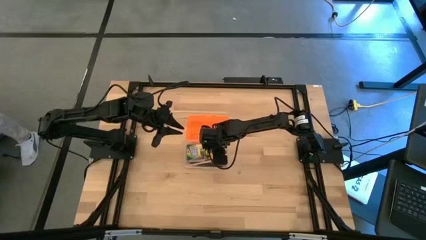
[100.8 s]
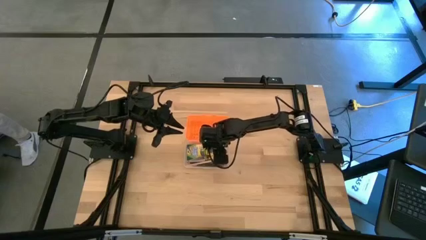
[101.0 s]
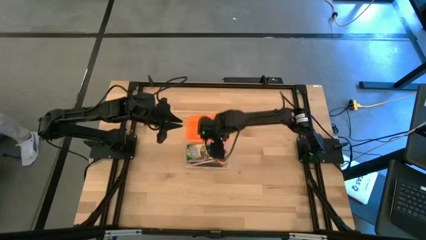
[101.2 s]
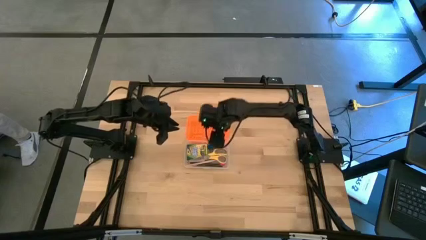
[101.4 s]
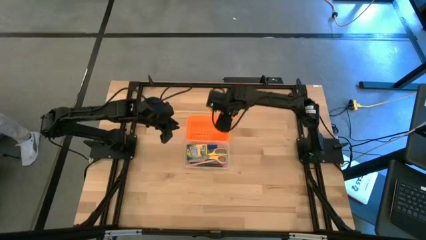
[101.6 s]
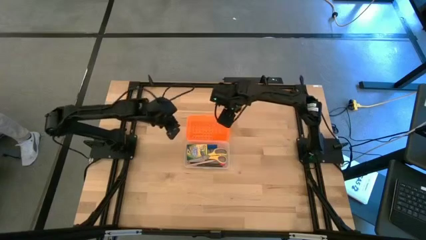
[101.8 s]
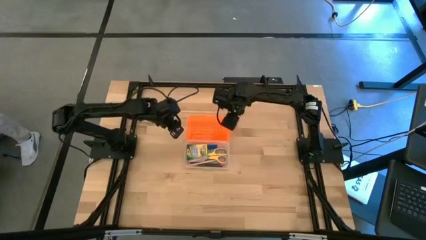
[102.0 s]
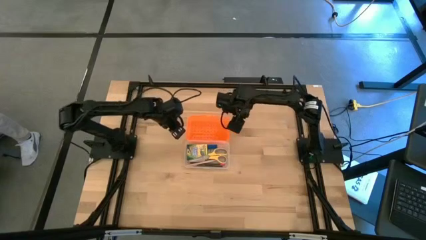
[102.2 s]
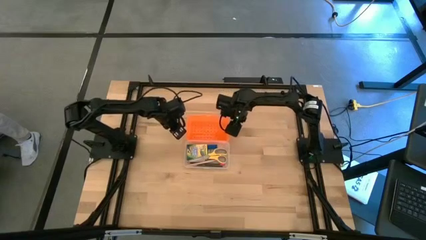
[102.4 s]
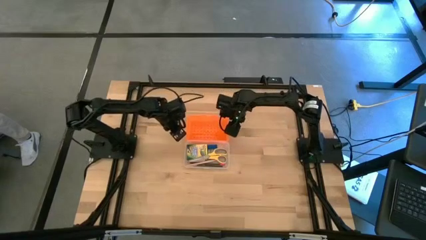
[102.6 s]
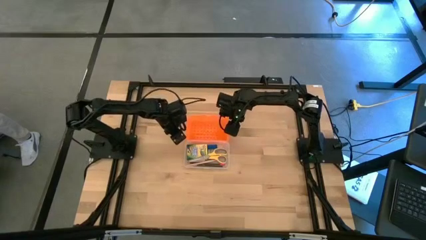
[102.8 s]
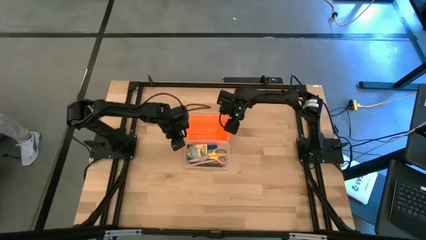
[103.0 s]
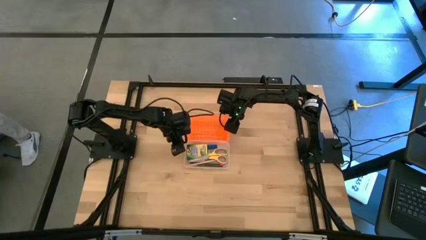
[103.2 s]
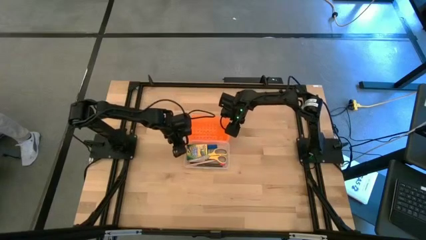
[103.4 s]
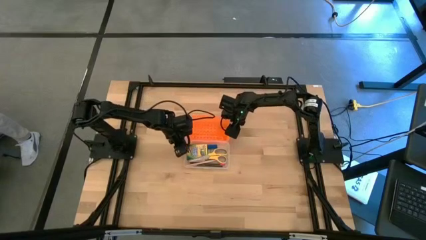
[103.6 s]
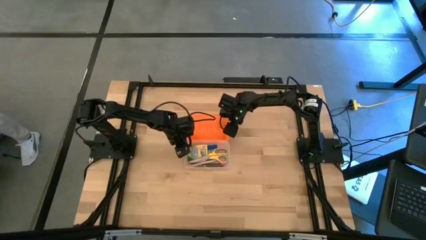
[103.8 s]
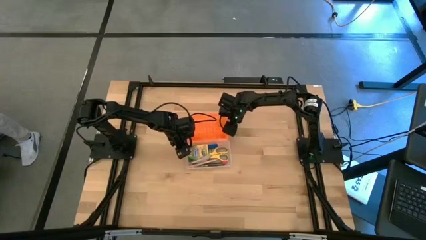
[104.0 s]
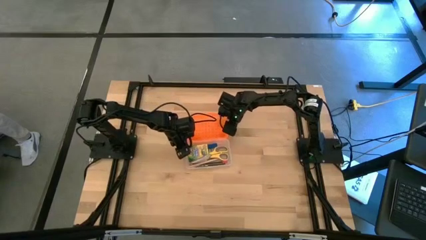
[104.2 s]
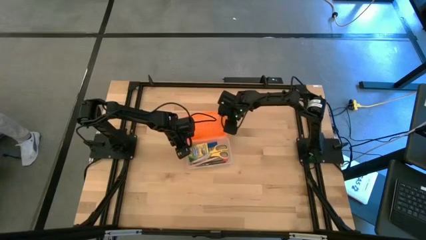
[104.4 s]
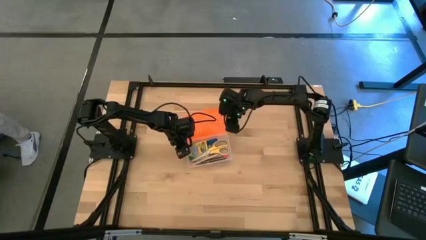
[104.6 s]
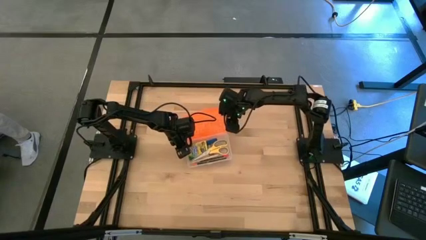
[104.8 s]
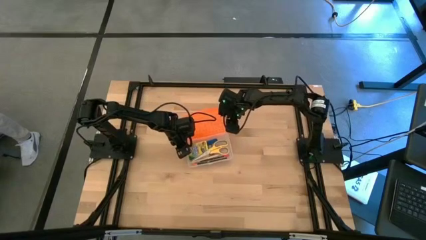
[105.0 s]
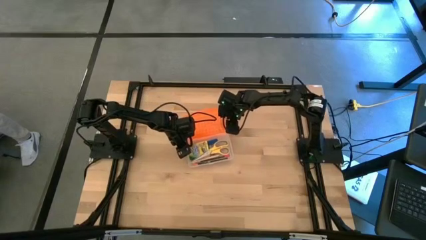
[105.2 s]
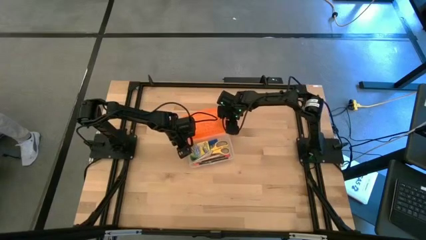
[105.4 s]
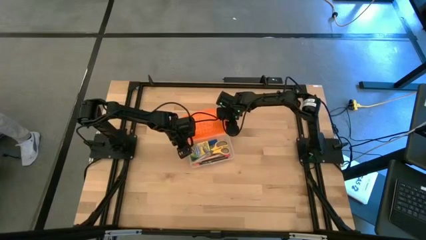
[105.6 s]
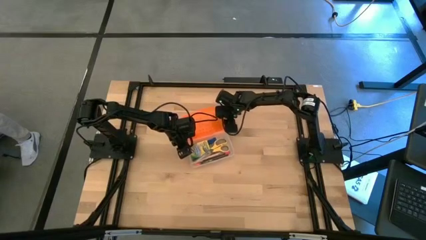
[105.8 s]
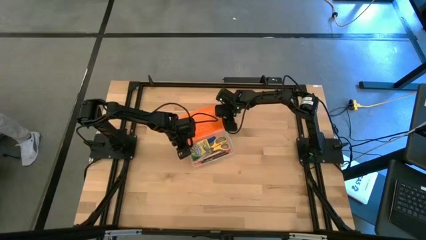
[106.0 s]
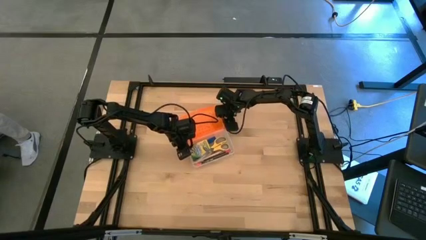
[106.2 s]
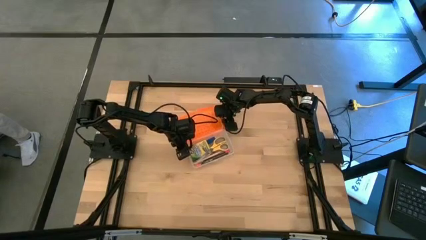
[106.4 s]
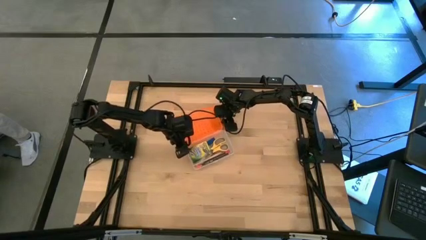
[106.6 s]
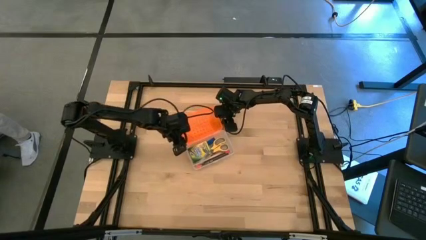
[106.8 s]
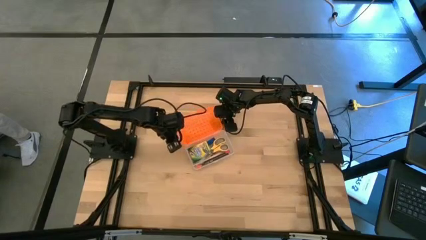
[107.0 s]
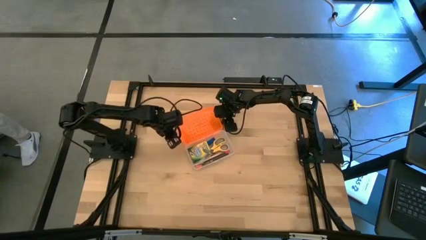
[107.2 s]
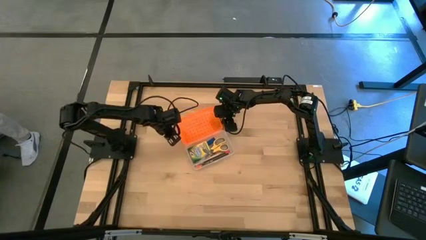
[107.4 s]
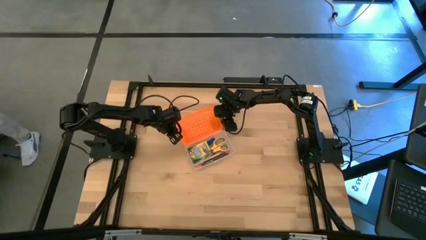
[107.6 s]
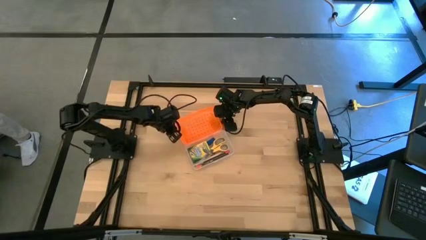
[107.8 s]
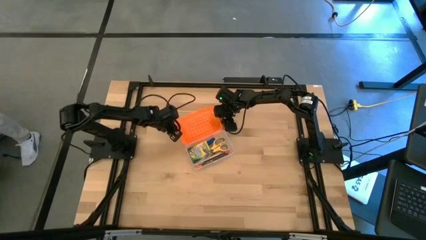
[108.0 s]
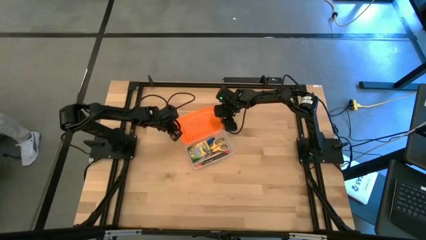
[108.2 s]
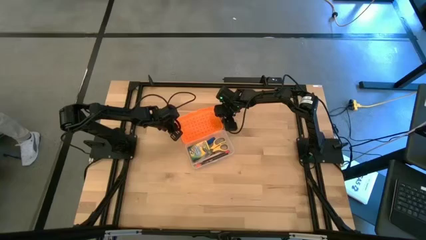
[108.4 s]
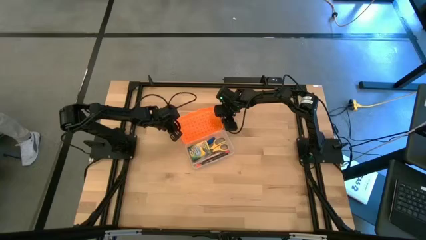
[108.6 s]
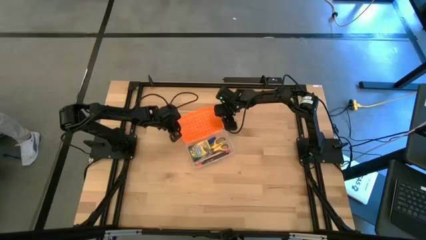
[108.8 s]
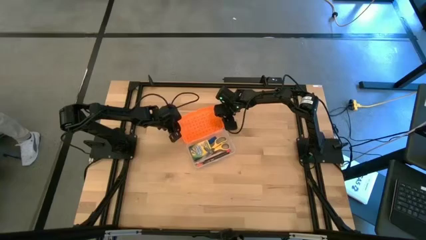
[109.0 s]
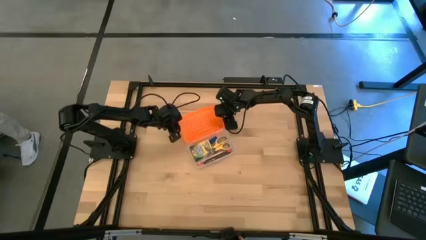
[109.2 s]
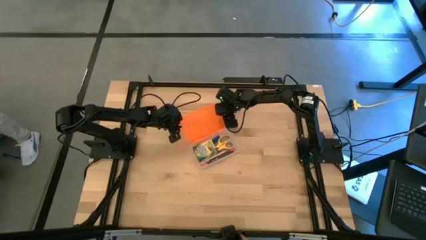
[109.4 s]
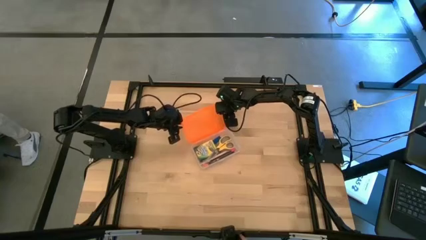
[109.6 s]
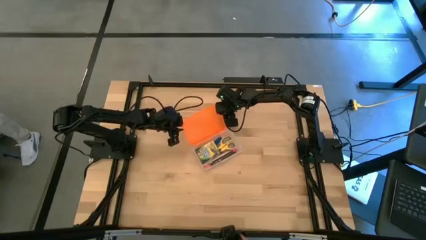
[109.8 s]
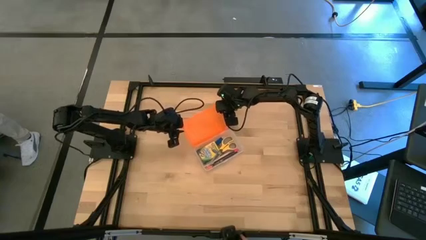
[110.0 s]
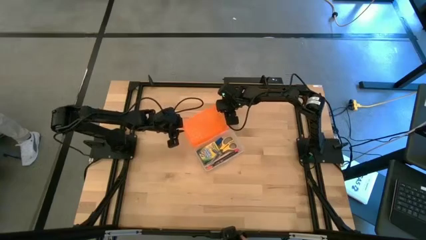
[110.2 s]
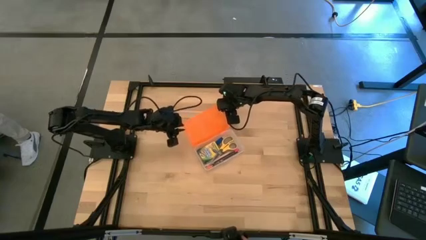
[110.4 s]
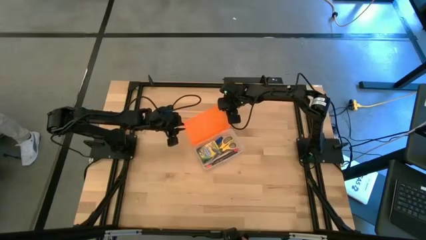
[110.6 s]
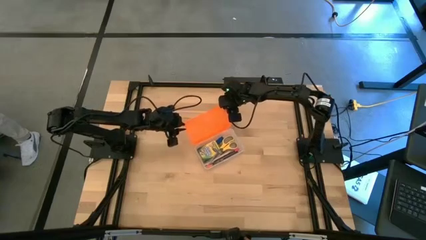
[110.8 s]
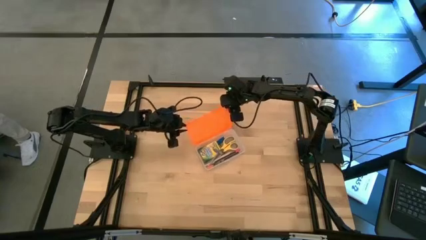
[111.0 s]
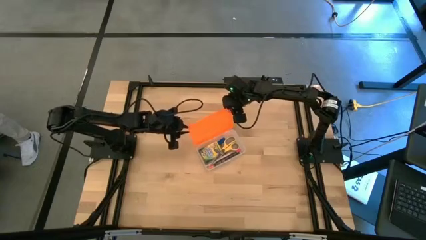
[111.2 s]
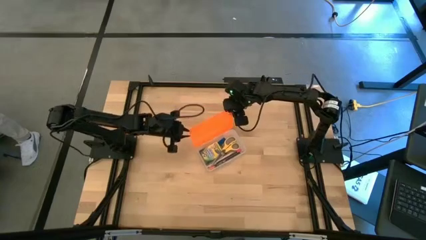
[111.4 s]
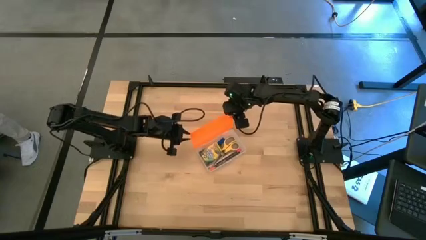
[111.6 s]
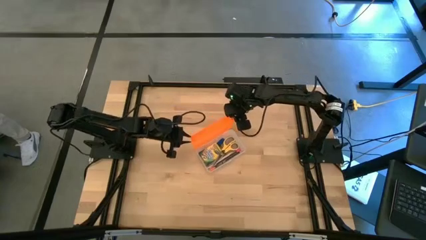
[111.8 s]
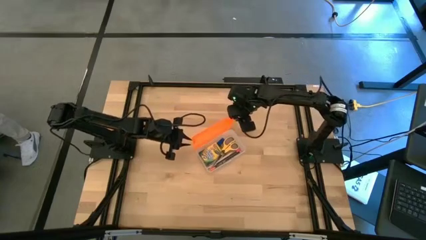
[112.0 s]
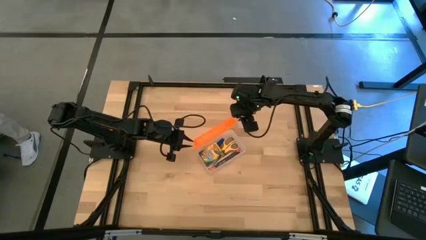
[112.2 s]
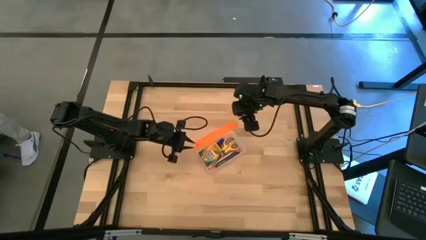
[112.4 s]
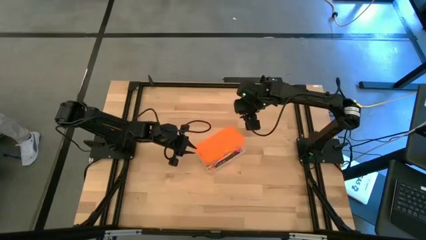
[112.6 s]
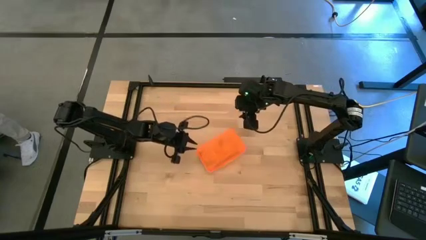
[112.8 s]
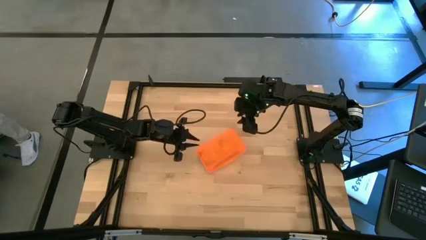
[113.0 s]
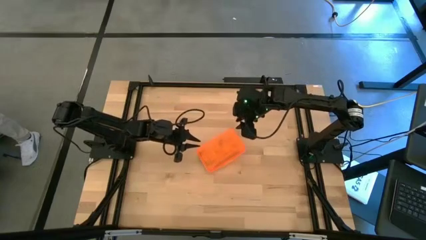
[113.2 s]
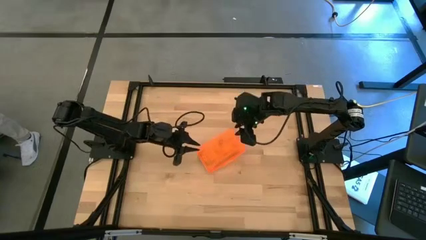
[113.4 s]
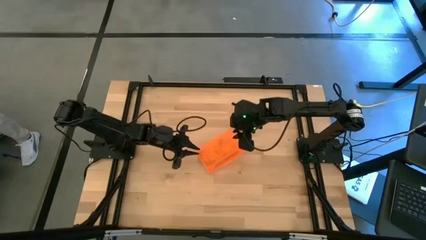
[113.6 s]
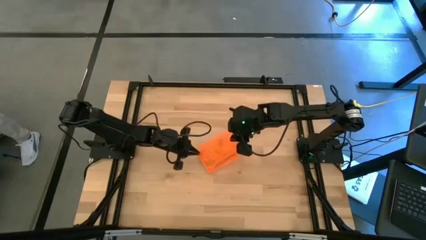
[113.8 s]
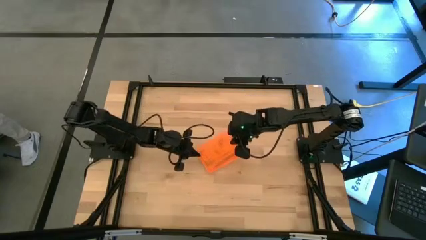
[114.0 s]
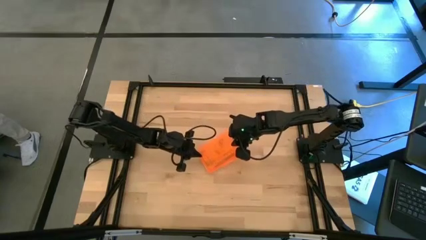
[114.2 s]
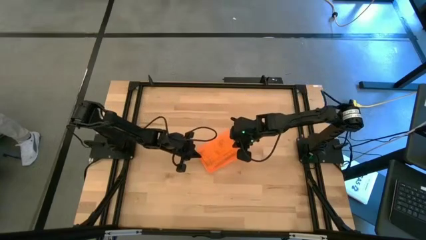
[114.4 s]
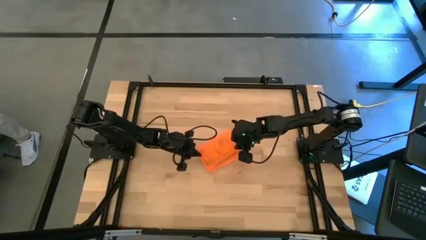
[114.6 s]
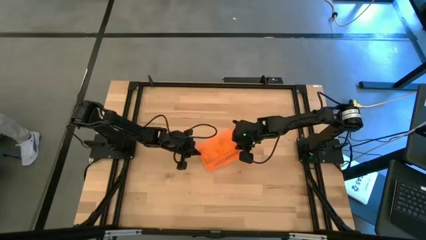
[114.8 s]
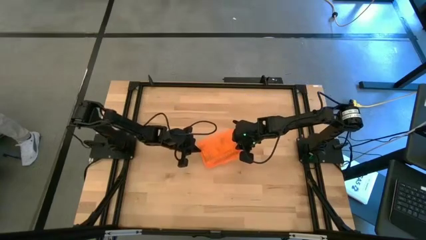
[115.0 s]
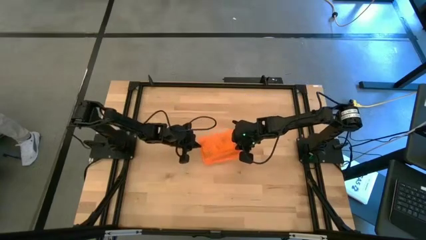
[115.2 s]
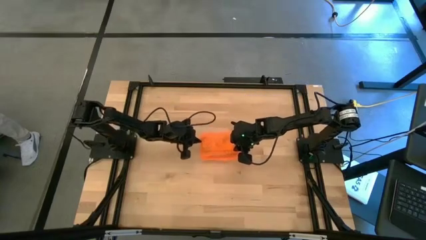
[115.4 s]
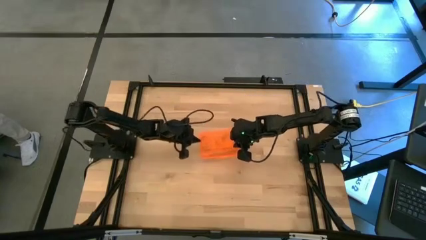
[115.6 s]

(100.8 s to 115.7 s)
Task: Pack school essentials
Close the supply box lid
